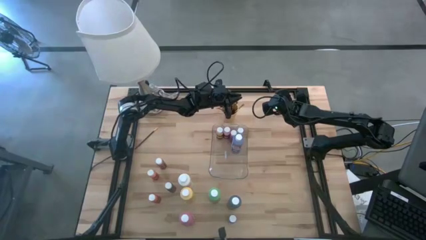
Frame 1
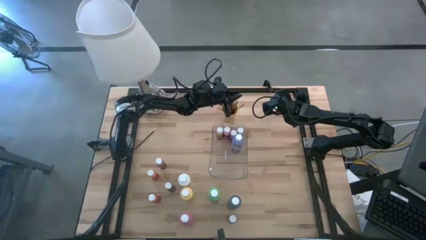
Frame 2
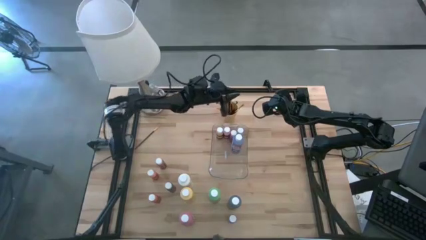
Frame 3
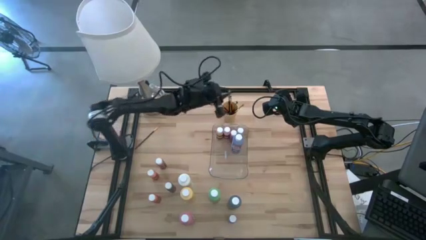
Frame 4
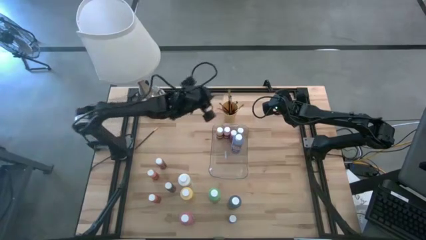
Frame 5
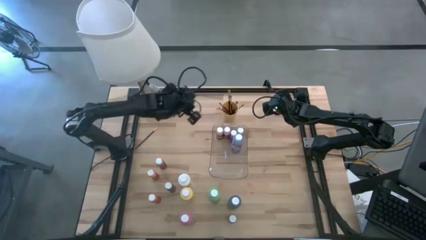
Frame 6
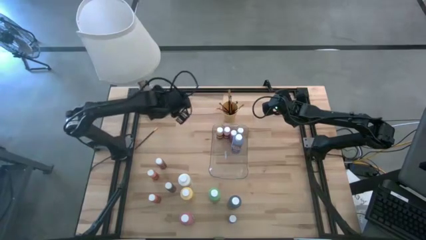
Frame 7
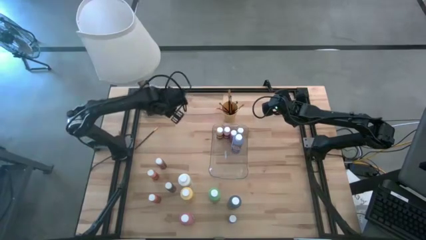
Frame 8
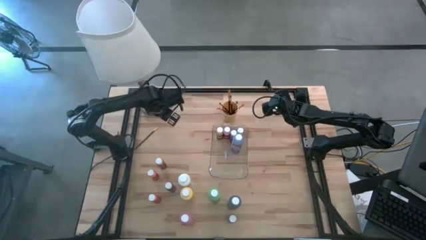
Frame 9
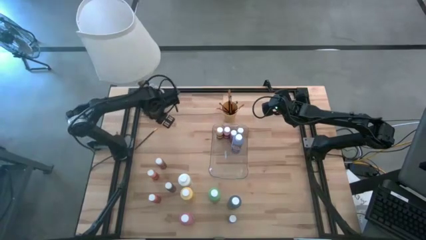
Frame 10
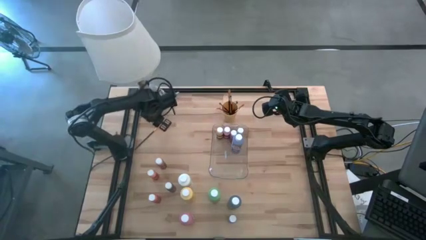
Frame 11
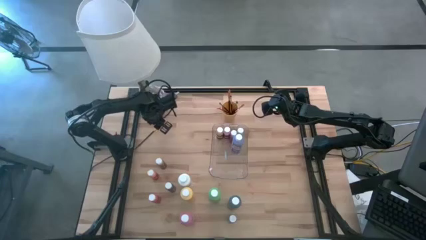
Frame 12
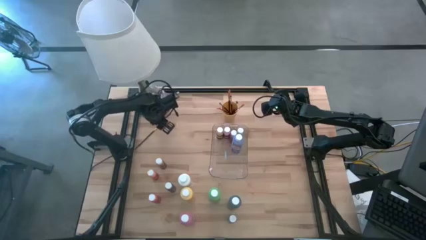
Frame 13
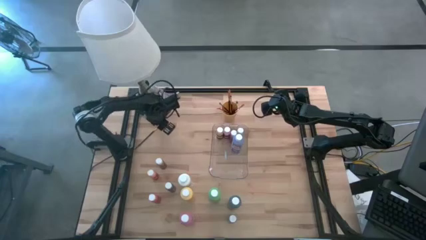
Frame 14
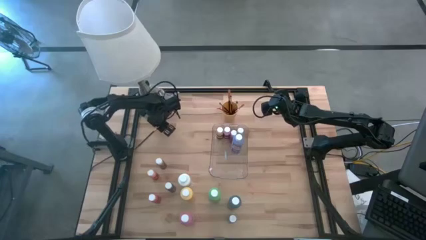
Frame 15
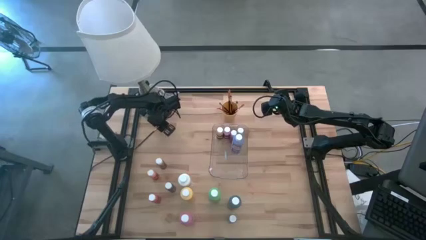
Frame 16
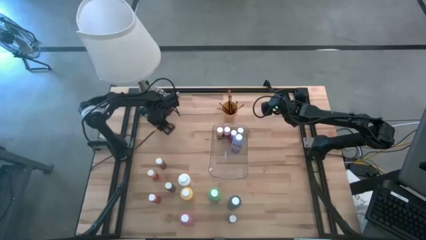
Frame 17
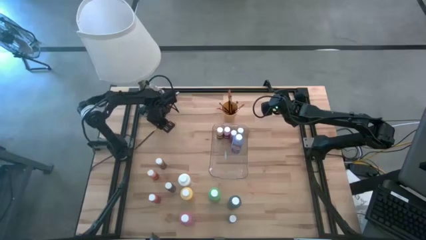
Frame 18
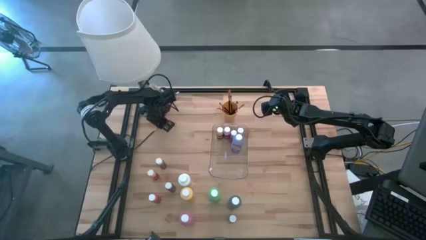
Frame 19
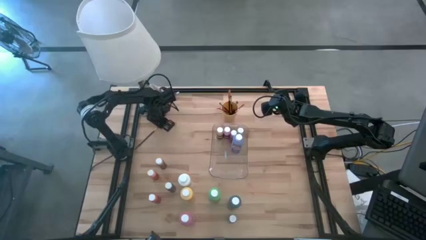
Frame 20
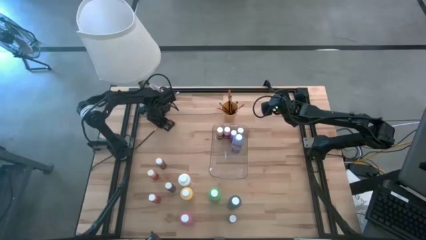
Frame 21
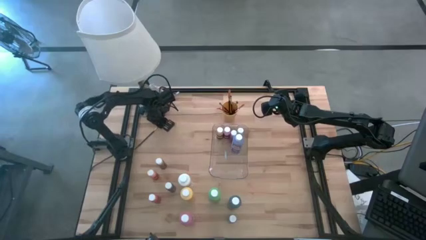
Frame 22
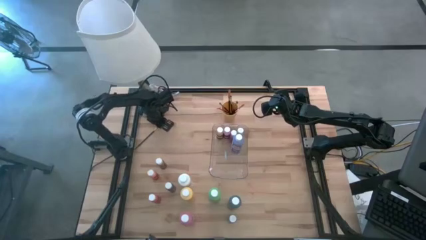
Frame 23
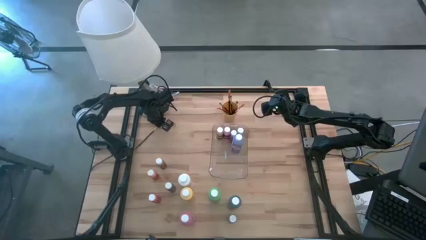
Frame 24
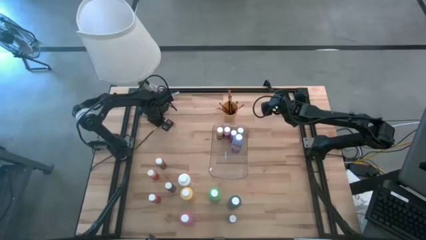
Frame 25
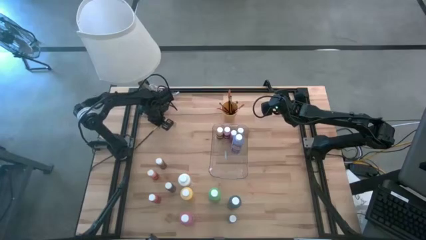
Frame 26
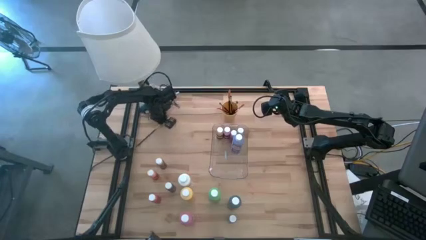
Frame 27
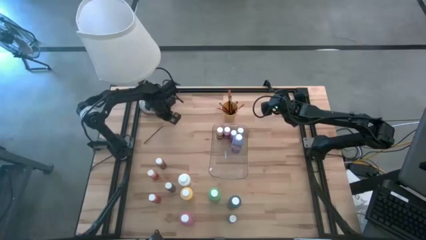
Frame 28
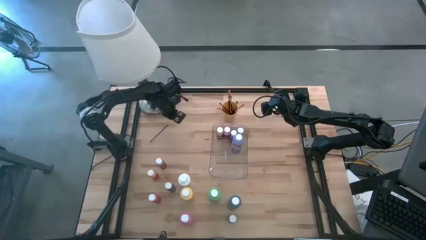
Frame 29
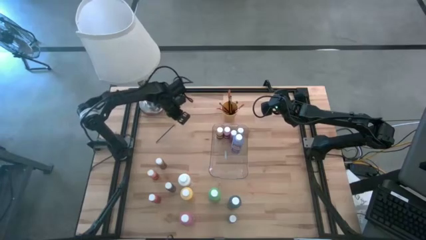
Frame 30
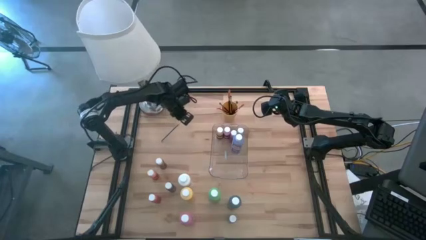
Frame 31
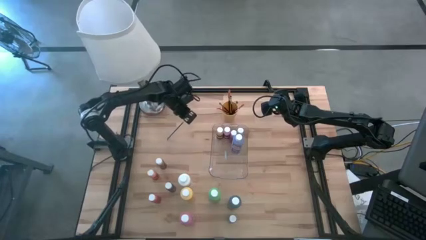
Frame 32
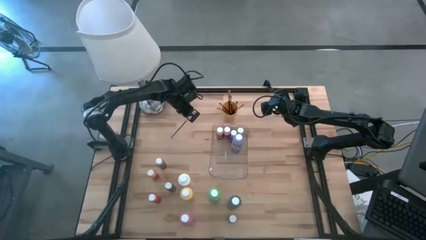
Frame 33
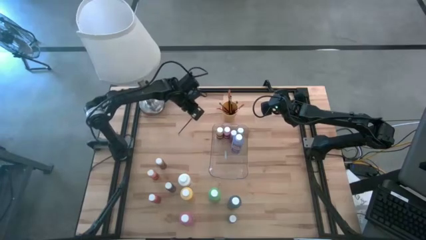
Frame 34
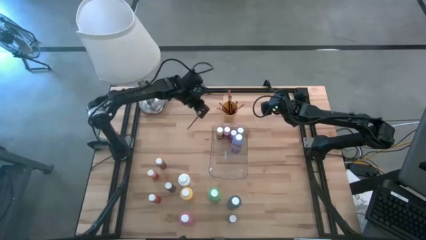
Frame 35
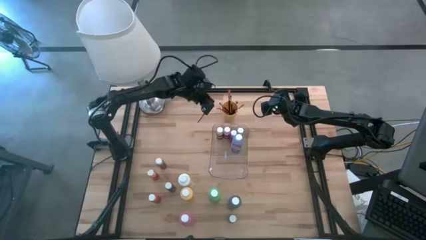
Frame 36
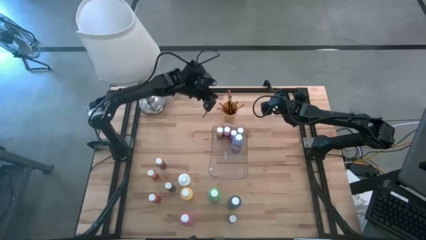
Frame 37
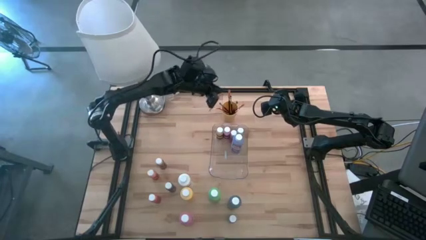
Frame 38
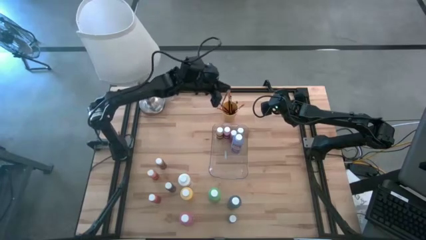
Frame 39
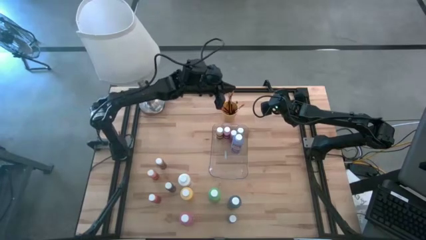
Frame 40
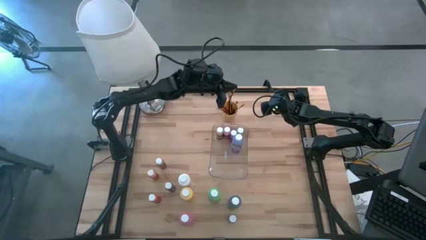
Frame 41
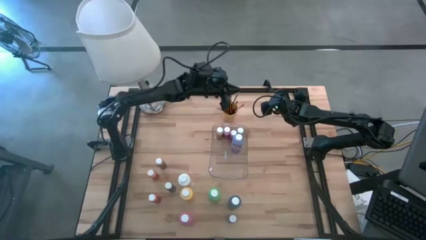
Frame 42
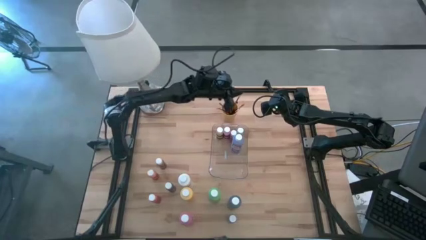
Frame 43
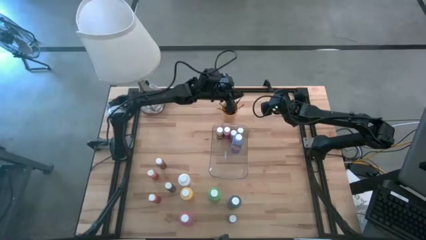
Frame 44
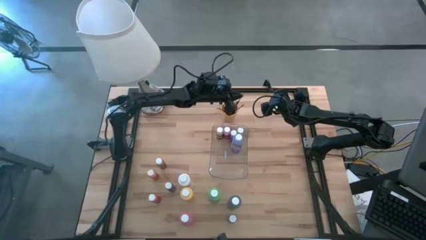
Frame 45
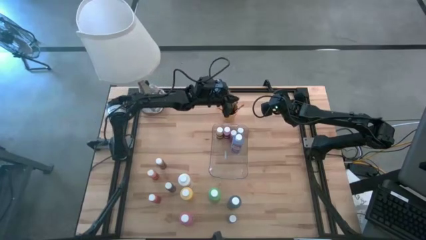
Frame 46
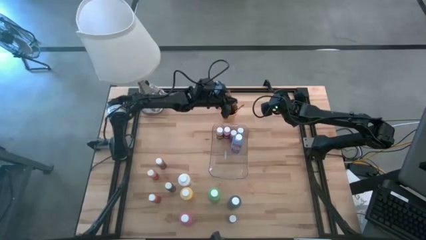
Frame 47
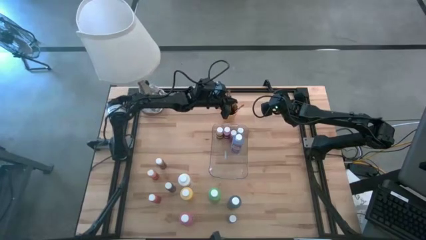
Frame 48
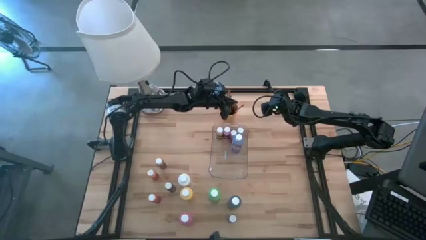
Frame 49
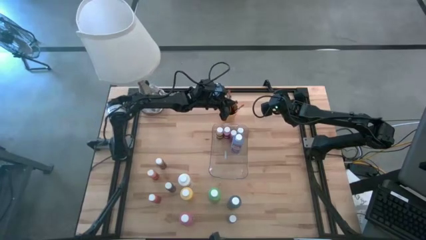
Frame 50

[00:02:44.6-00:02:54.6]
Task: Pick & Place Paint Supplies
Put the gold paint brush into the yellow cup

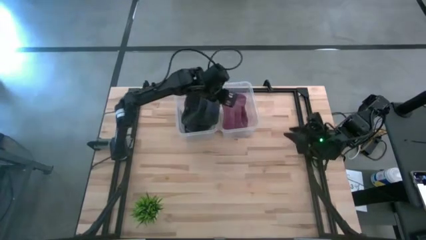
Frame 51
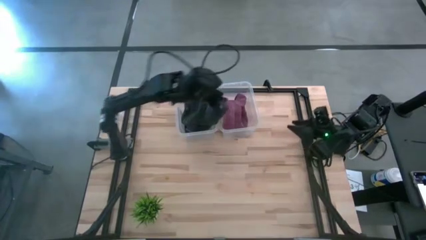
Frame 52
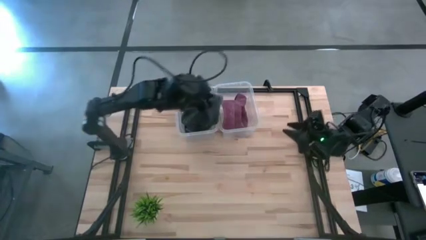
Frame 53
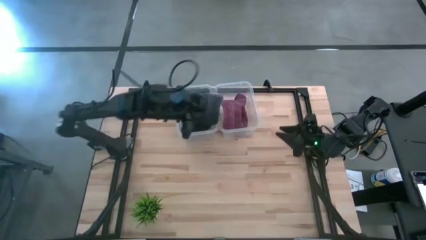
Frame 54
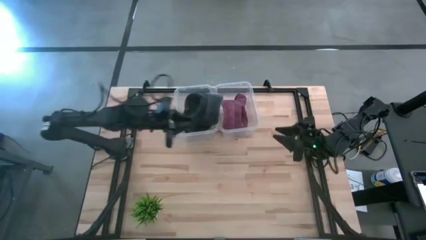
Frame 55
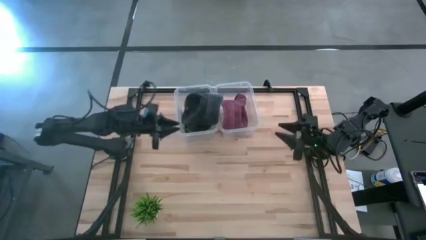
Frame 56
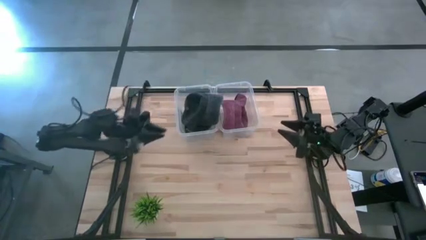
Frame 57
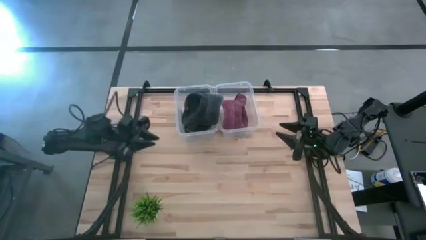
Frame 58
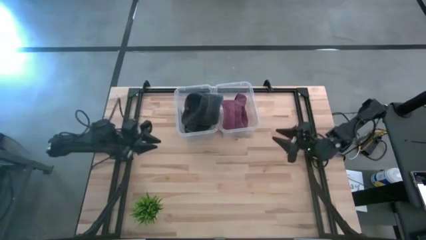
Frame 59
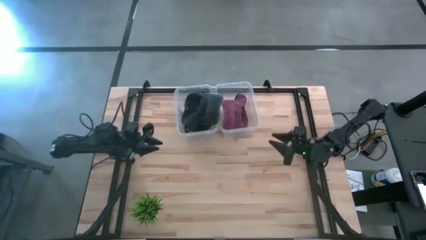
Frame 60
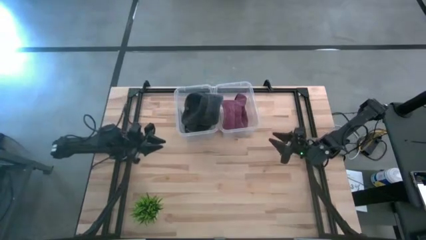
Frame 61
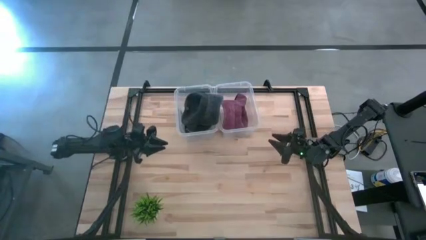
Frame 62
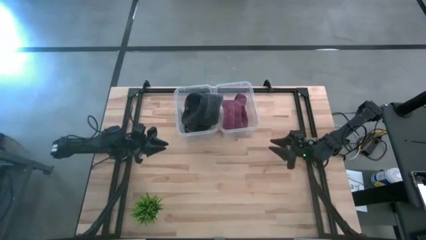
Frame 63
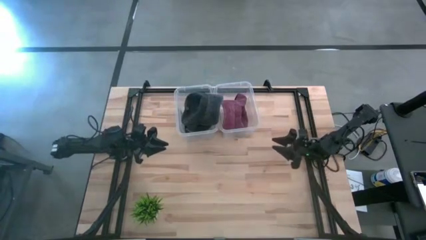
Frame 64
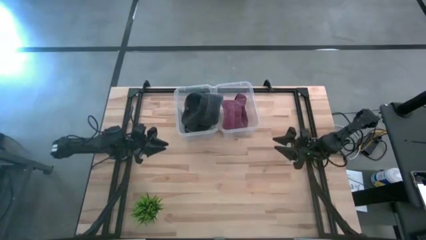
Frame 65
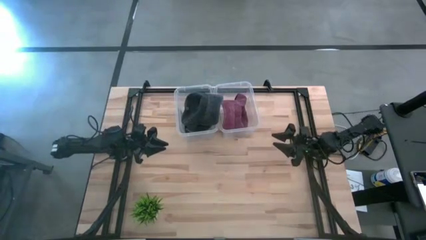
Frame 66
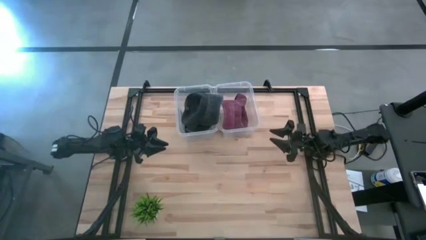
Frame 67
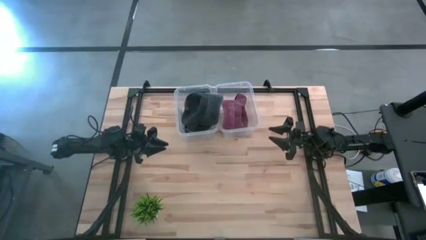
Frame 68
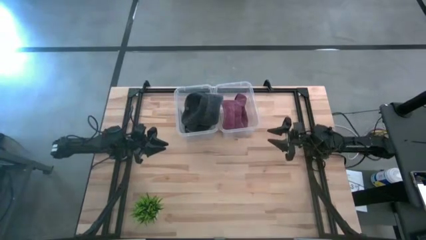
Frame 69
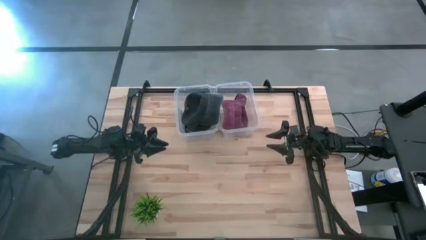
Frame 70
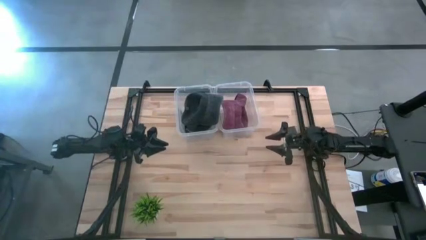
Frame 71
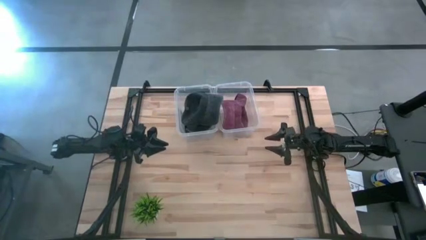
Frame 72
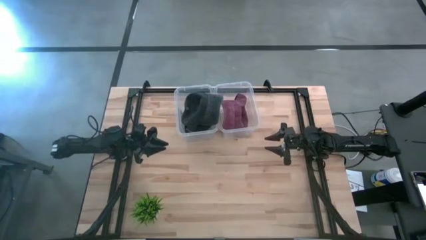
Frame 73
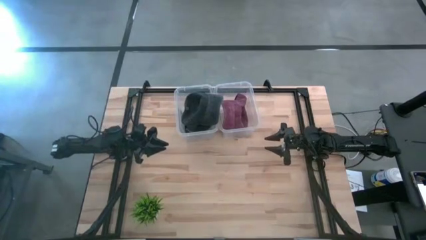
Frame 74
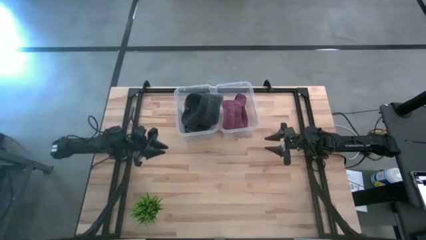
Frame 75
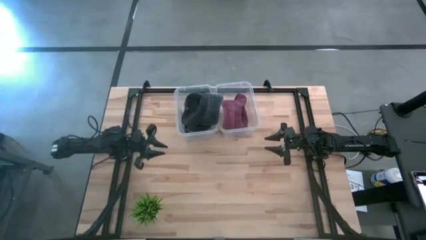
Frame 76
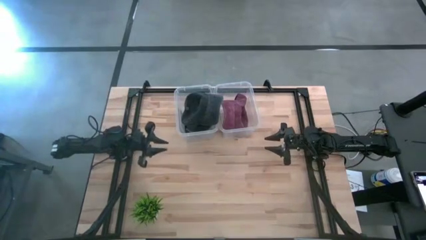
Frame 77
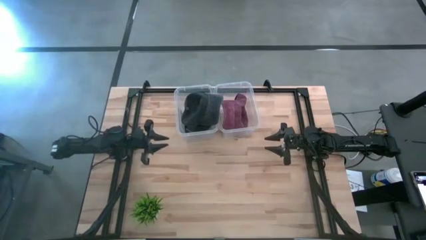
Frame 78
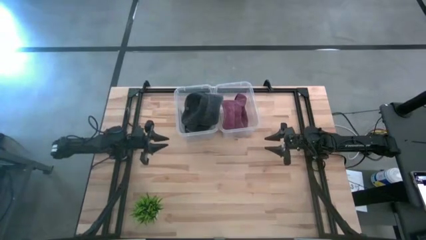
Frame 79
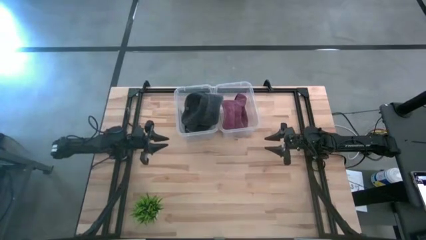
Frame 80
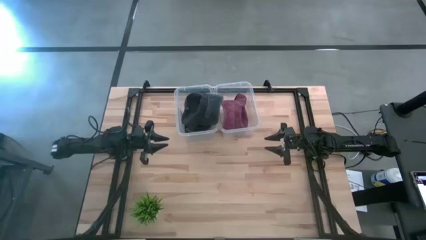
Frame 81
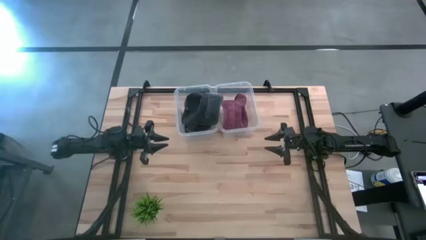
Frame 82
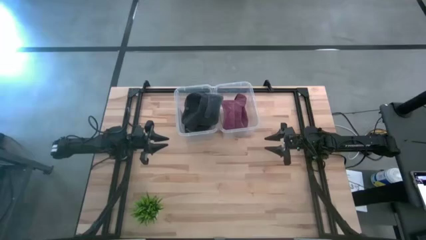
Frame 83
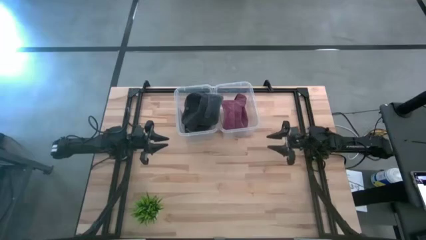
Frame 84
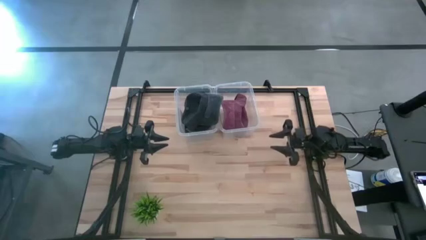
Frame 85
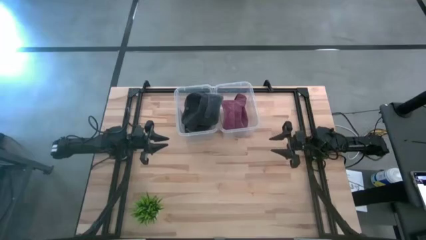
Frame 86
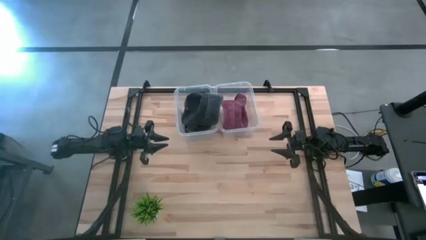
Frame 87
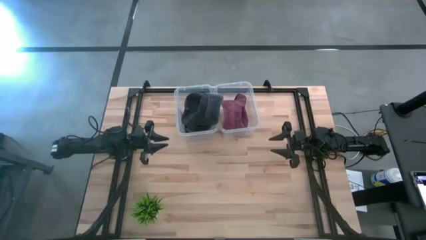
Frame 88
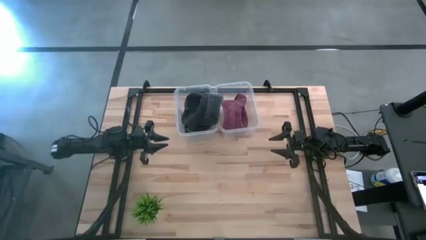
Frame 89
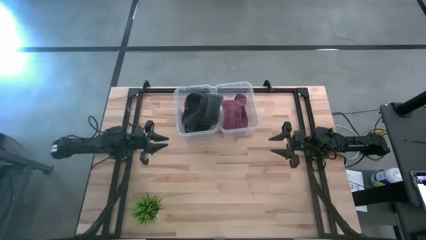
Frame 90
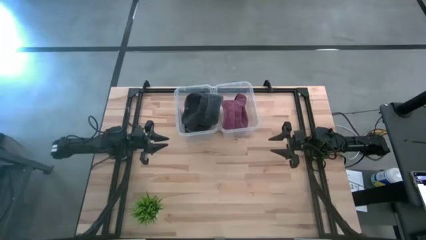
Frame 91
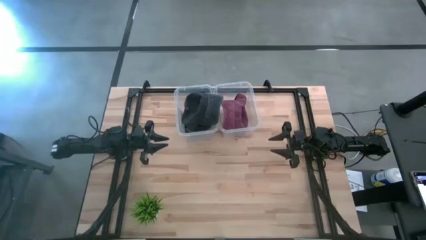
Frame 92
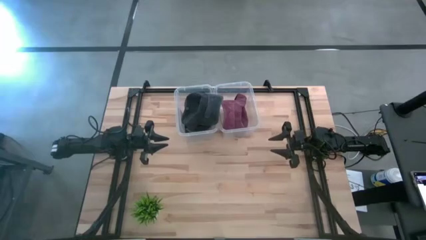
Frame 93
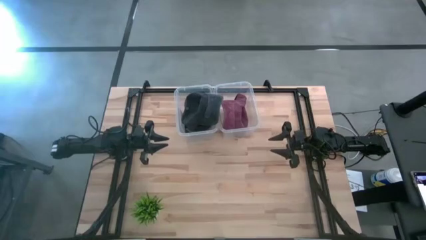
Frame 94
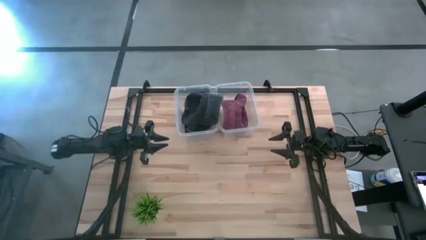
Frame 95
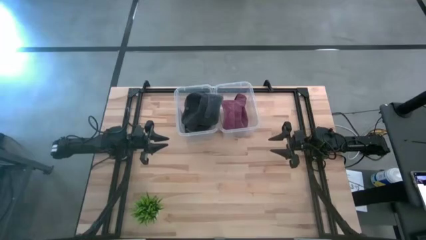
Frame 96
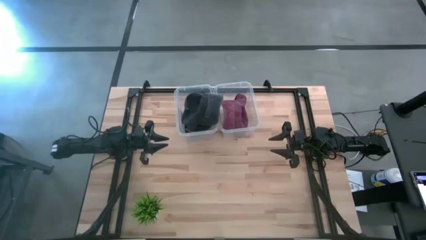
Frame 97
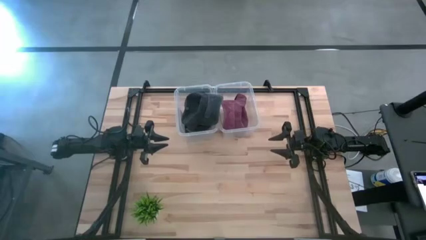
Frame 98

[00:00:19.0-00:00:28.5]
Task: Pick & Place hat
Return to Home Position
